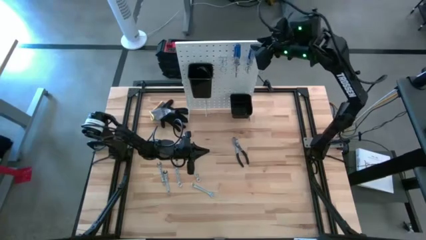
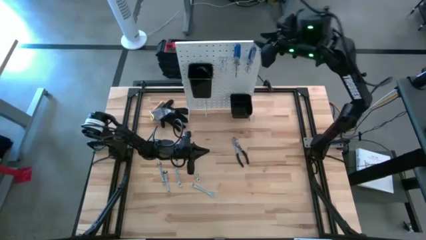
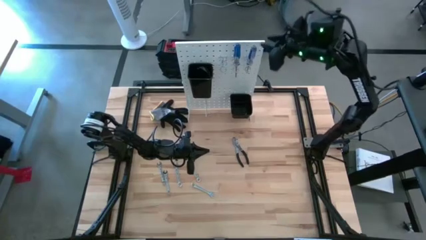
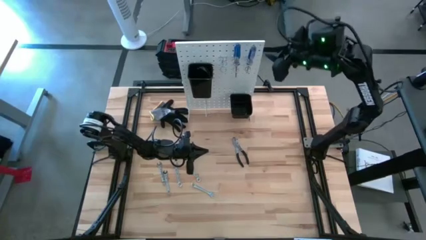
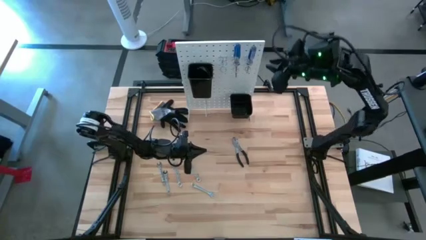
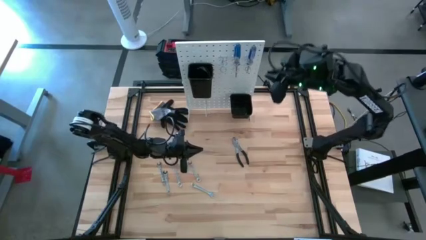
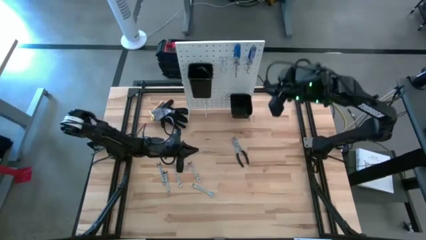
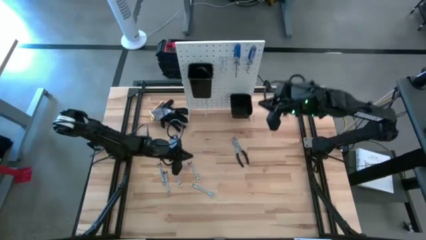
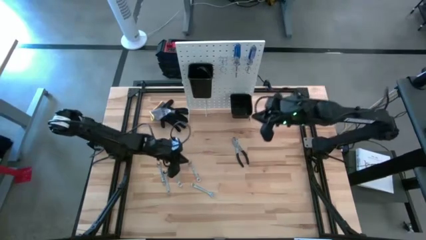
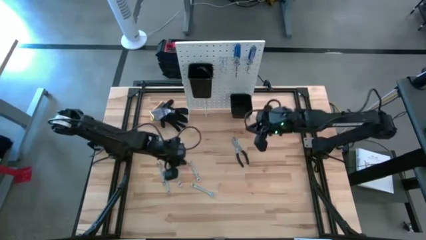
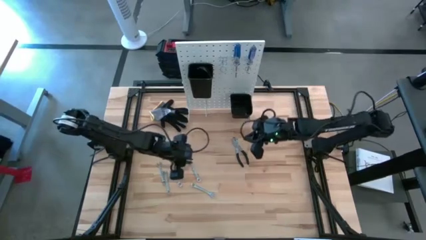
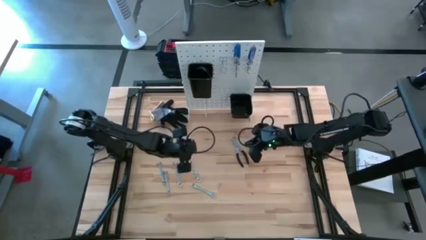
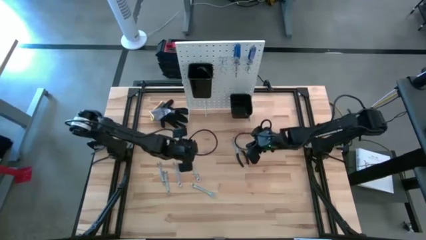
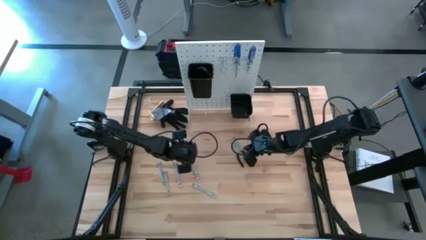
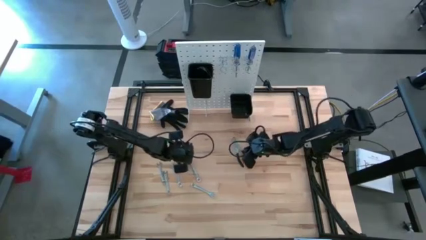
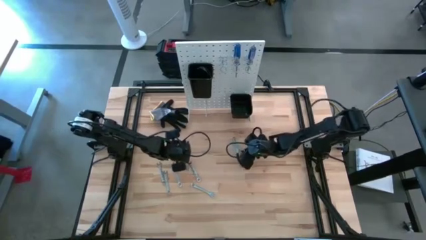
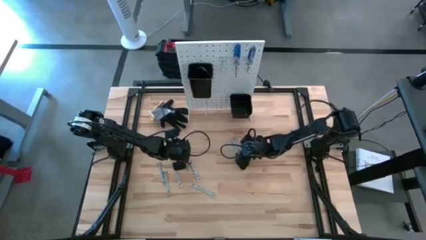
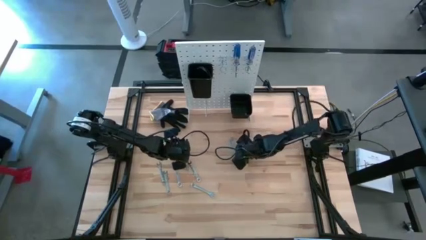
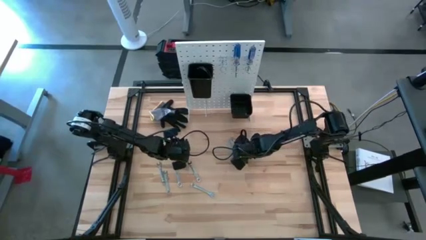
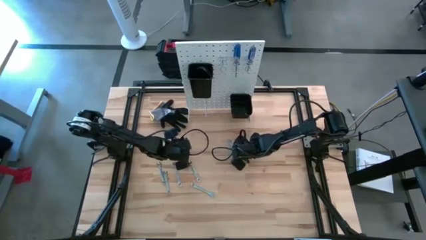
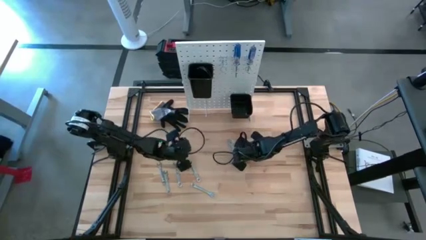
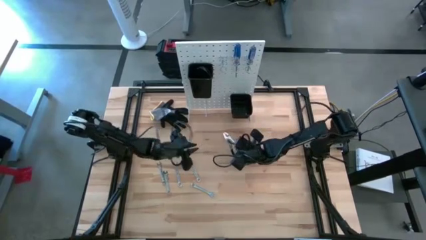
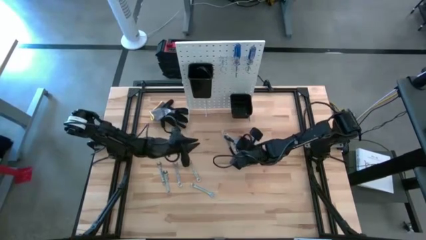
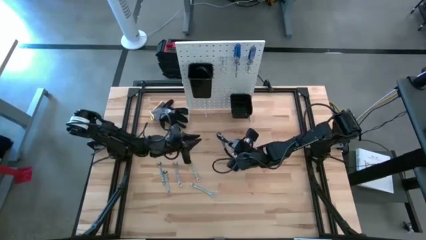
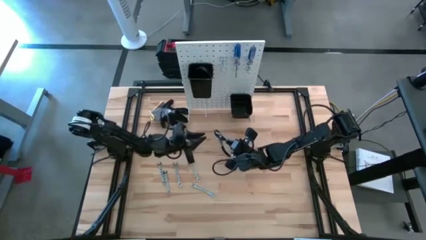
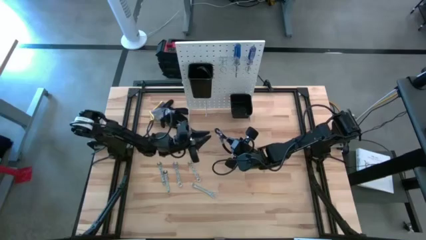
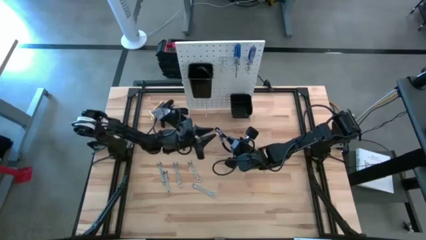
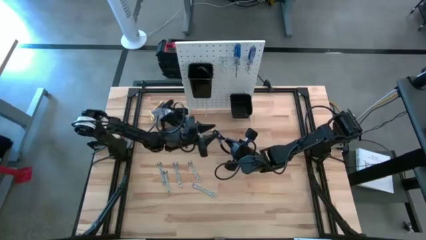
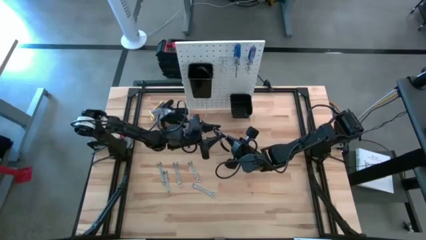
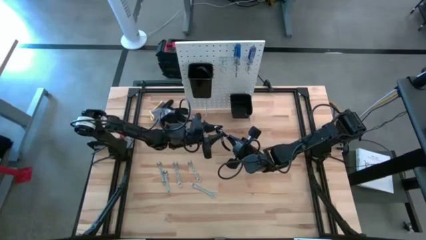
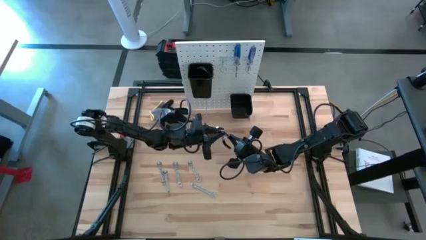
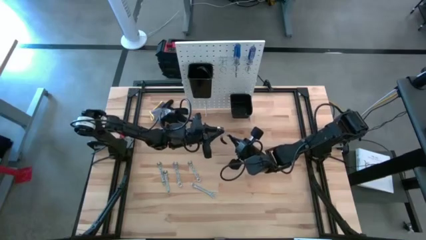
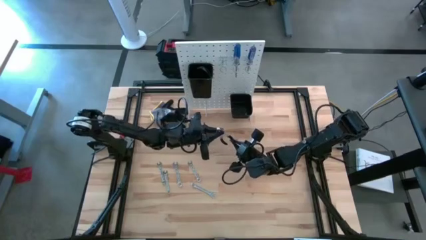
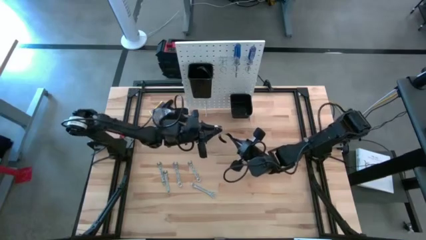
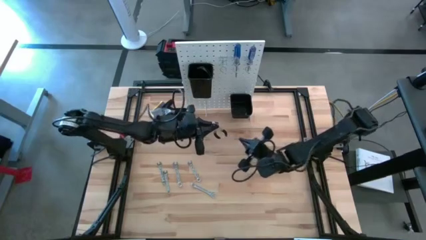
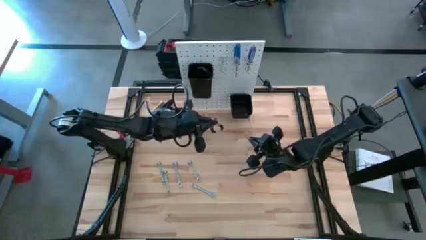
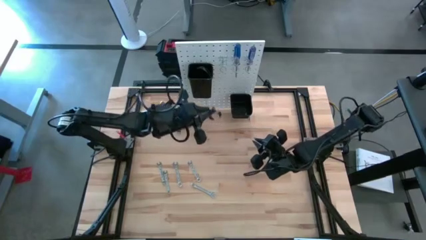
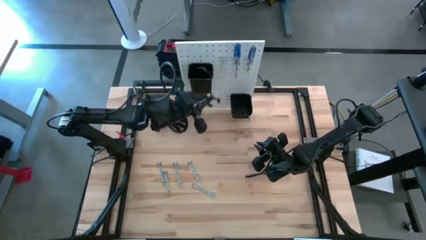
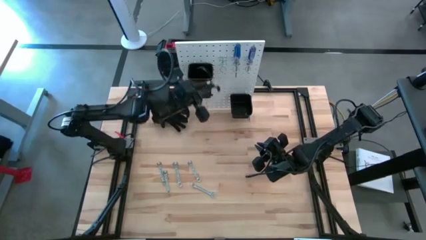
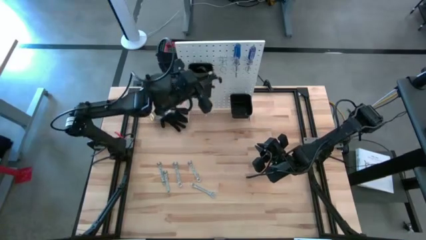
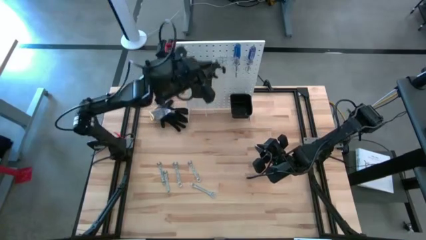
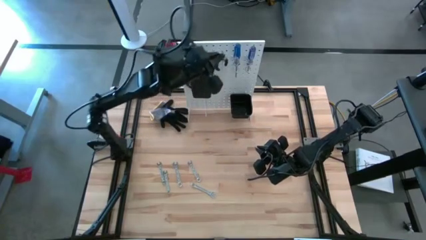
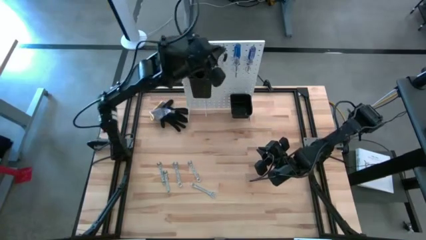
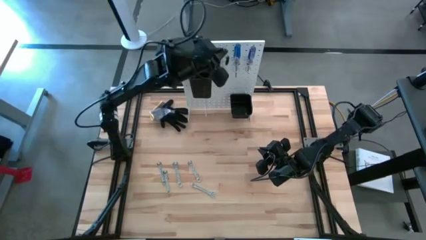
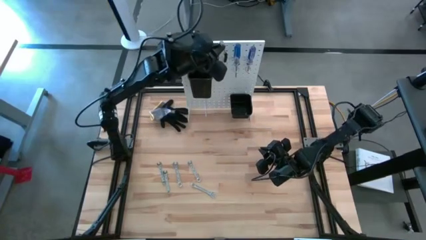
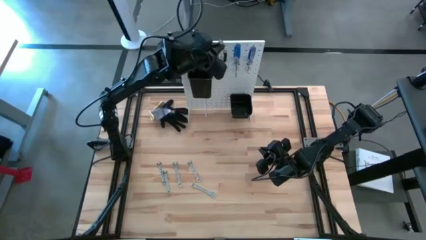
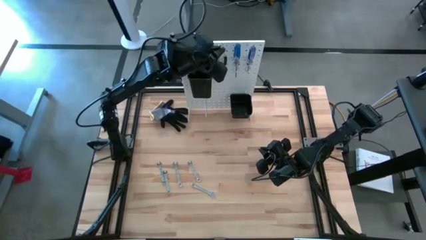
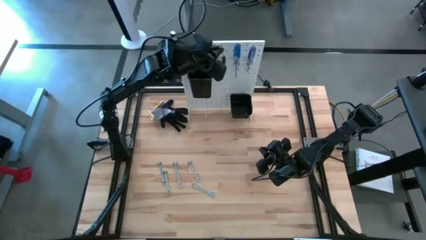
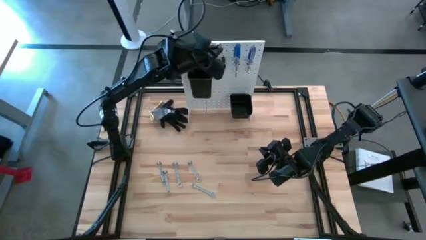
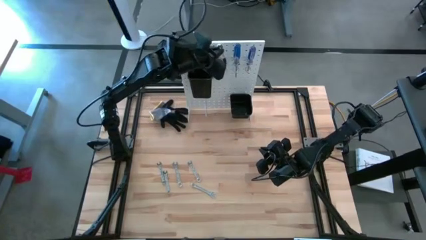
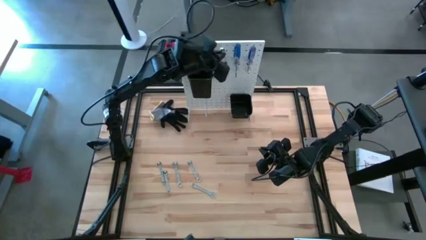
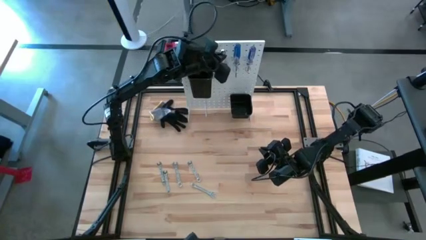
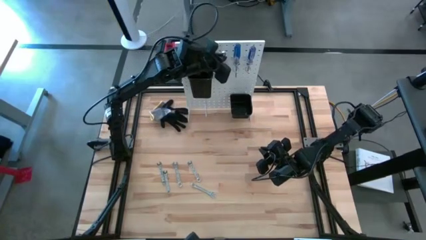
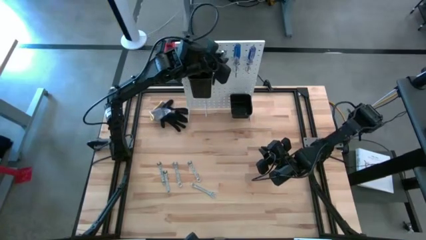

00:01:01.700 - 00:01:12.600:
Task: Hang tools onto peg board
Hang the black pliers on the peg board

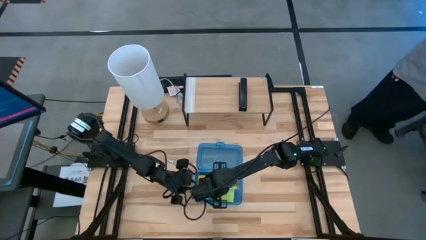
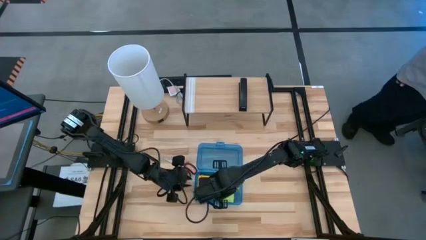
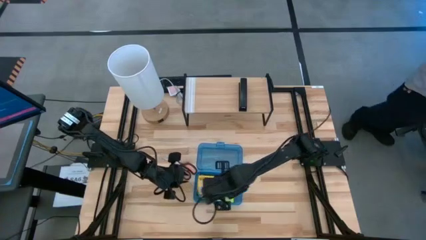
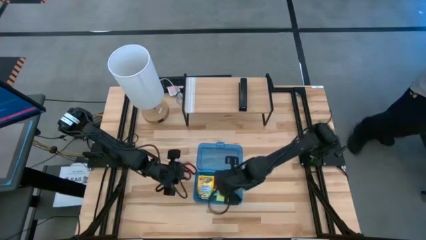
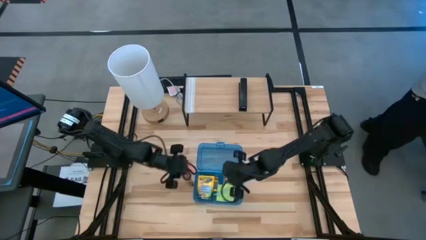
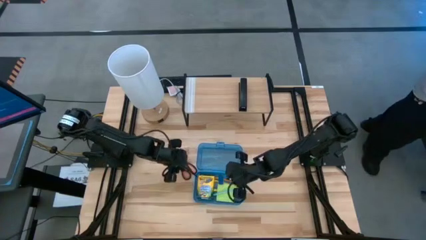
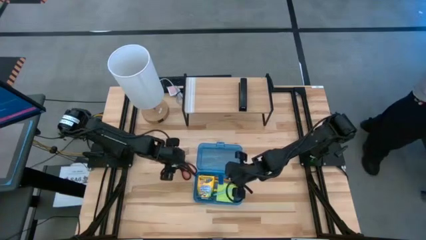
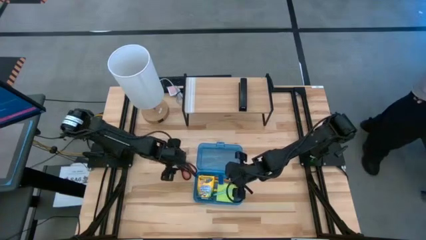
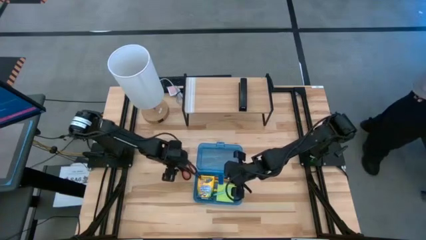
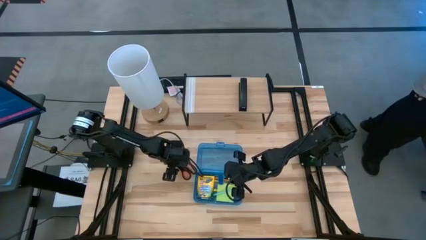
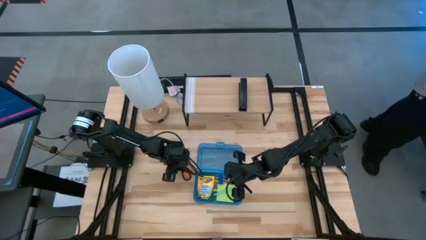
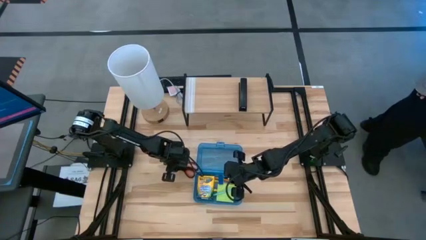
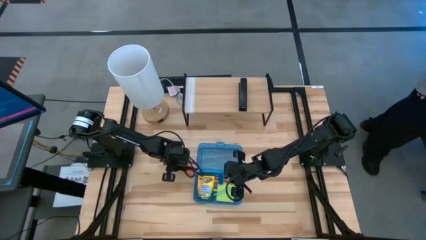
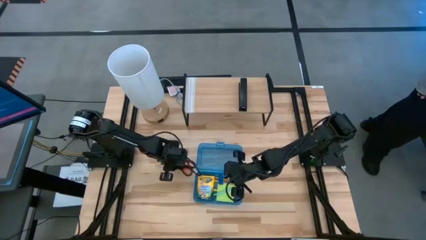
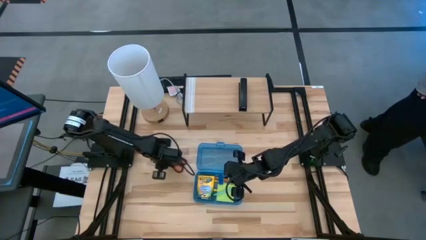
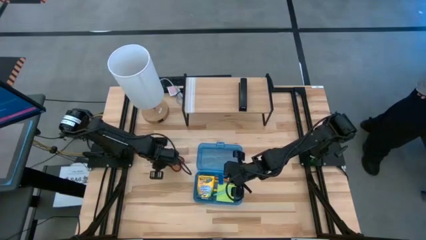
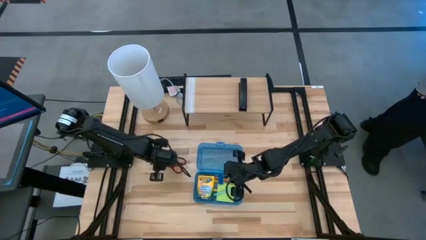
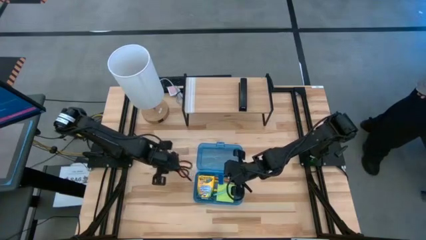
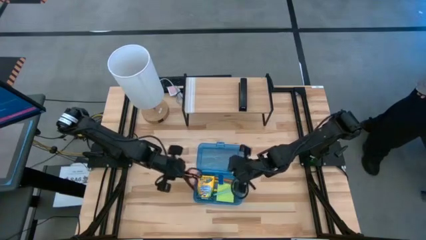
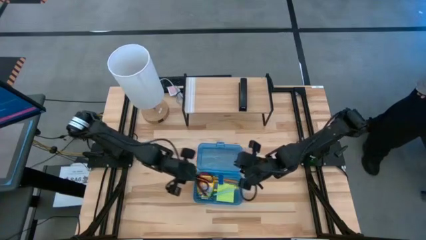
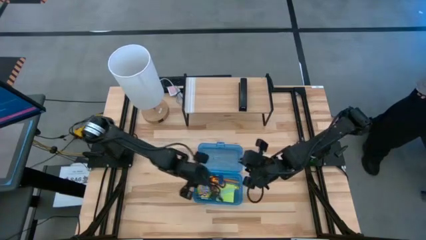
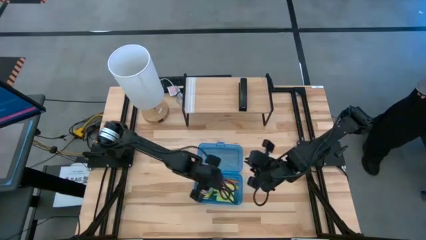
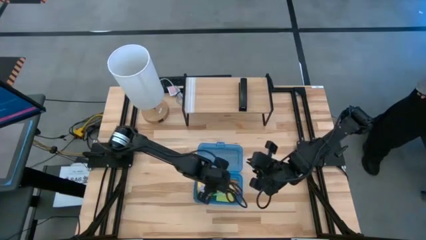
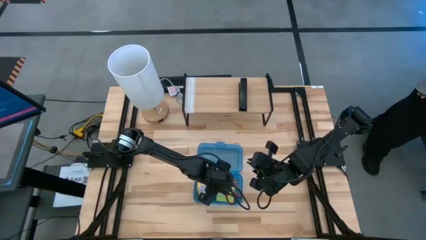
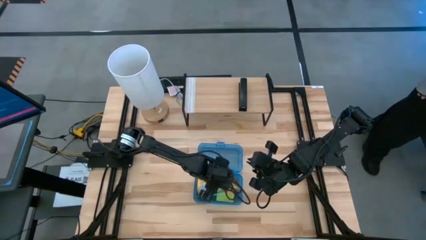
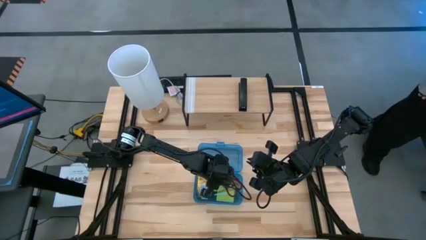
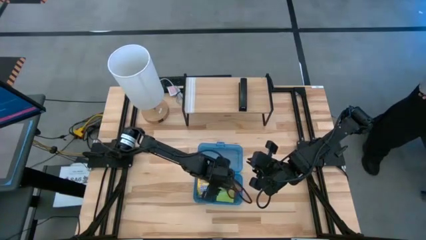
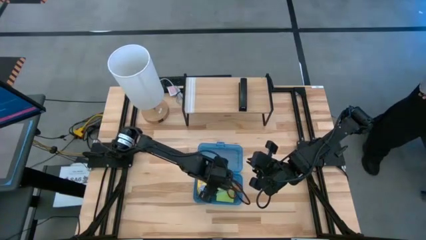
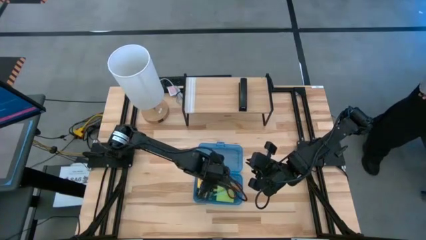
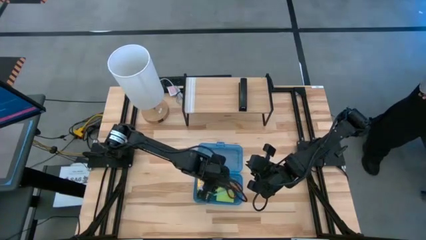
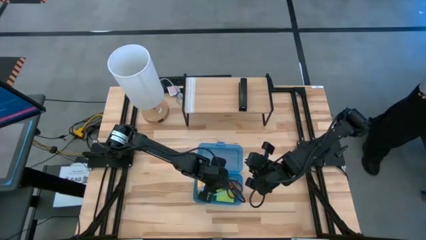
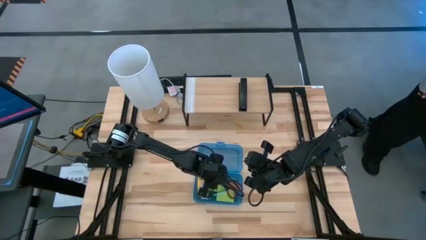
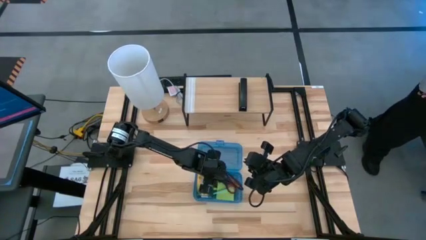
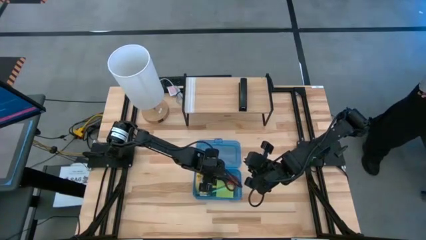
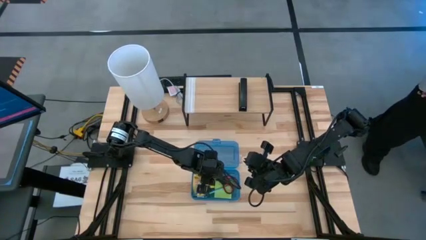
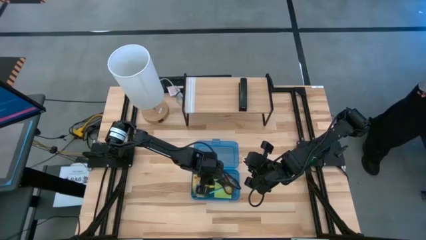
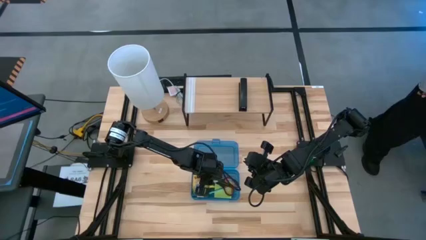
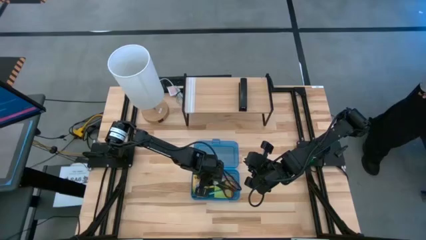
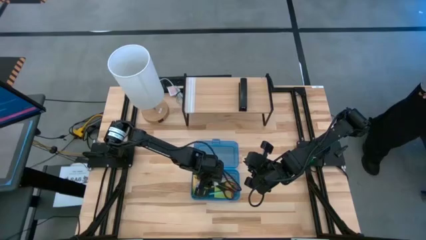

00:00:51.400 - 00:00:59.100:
Task: Pack school essentials
Put the black scissors into the blue supply box
